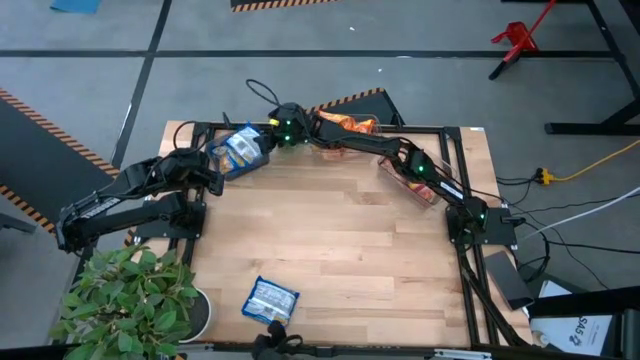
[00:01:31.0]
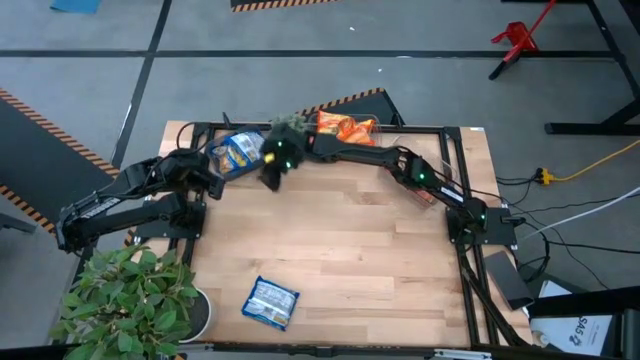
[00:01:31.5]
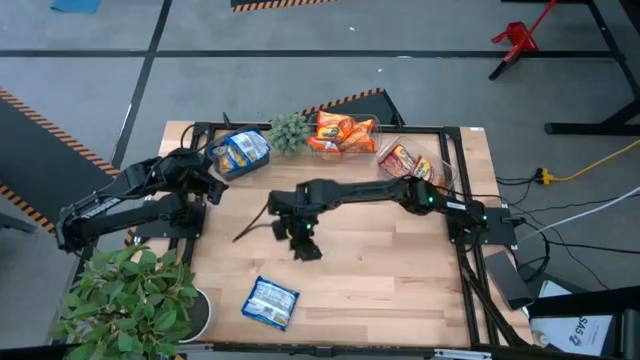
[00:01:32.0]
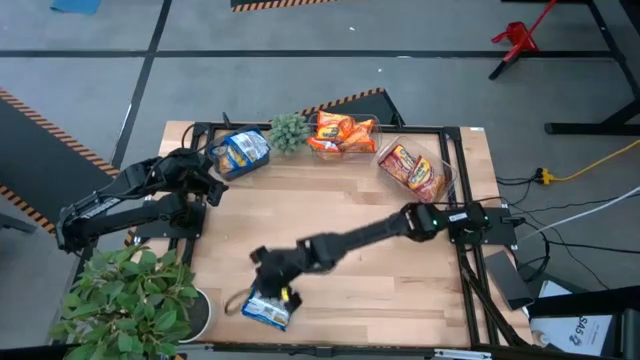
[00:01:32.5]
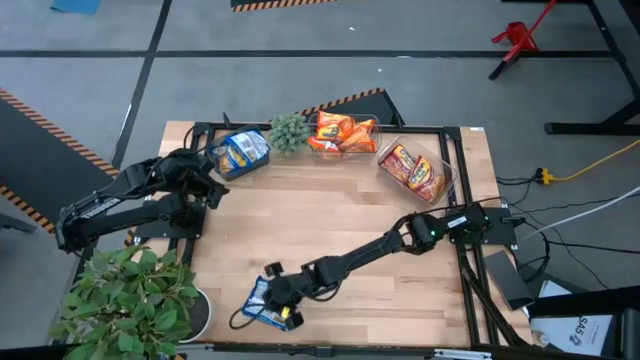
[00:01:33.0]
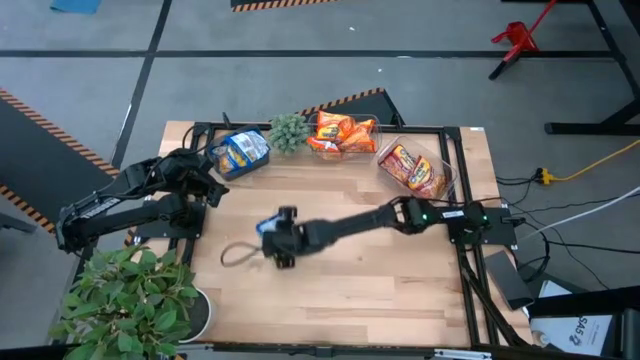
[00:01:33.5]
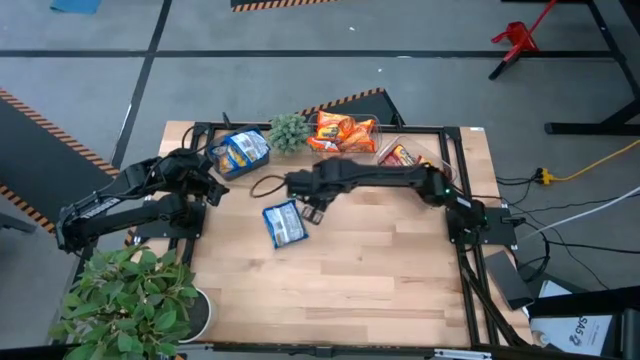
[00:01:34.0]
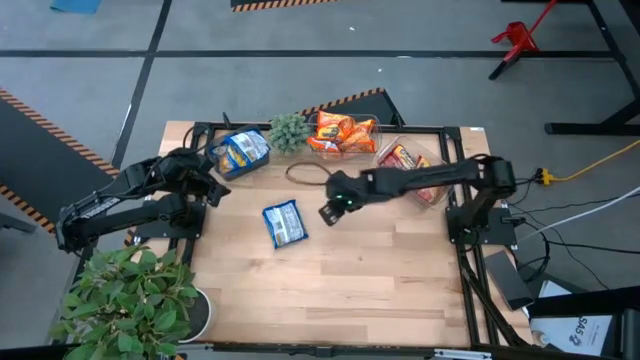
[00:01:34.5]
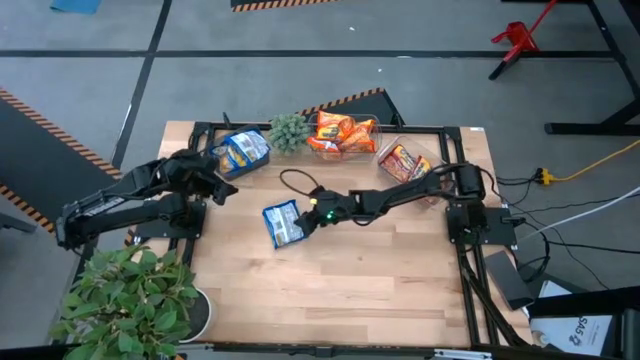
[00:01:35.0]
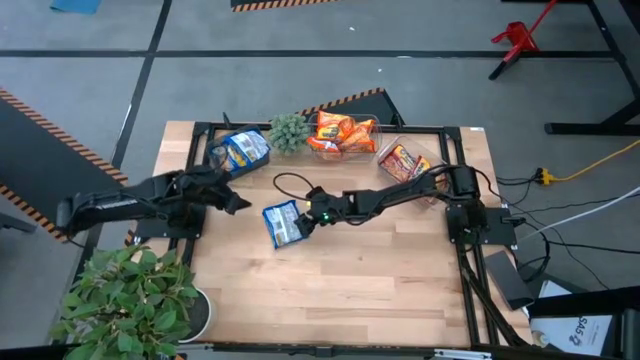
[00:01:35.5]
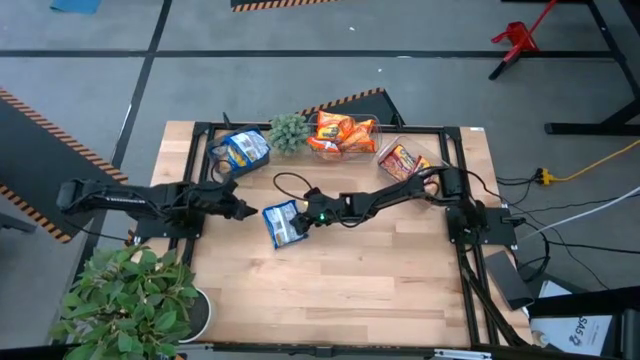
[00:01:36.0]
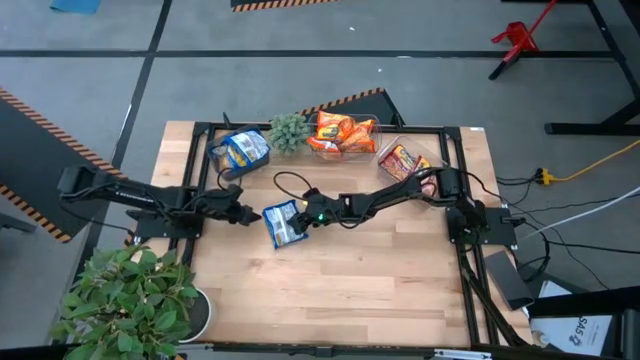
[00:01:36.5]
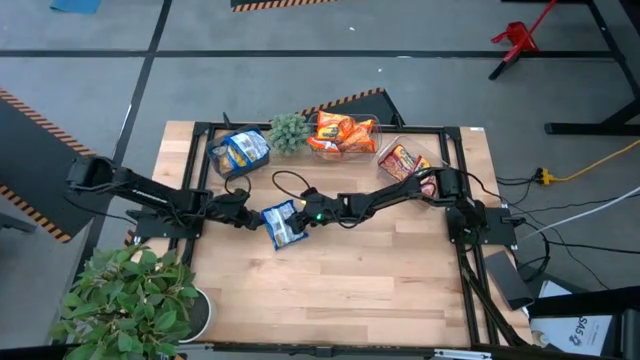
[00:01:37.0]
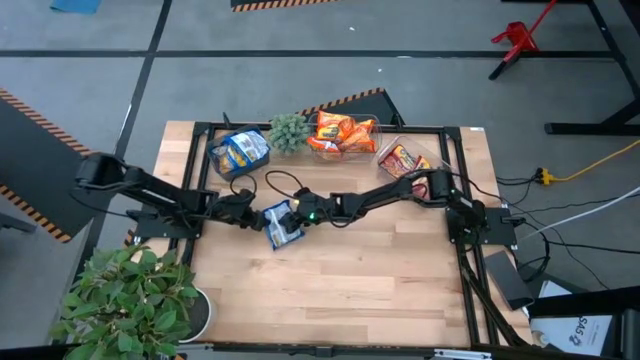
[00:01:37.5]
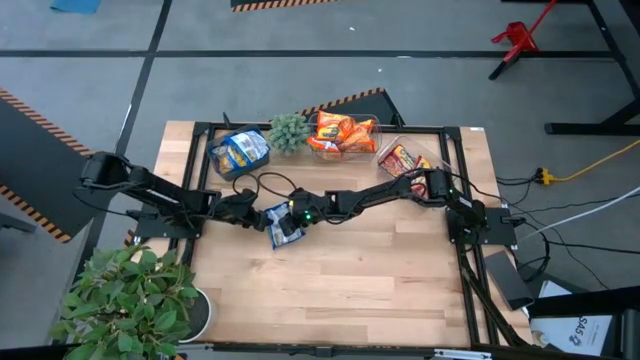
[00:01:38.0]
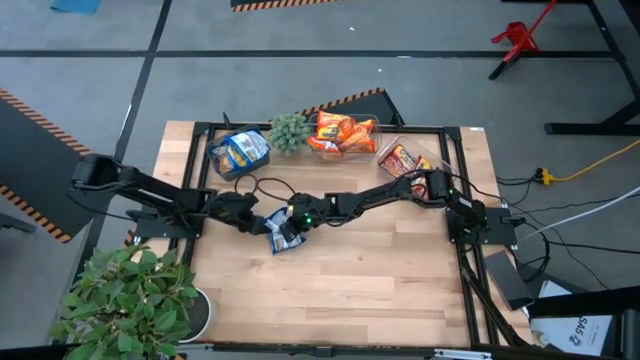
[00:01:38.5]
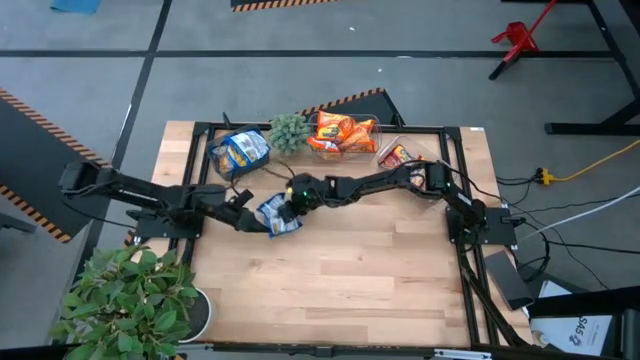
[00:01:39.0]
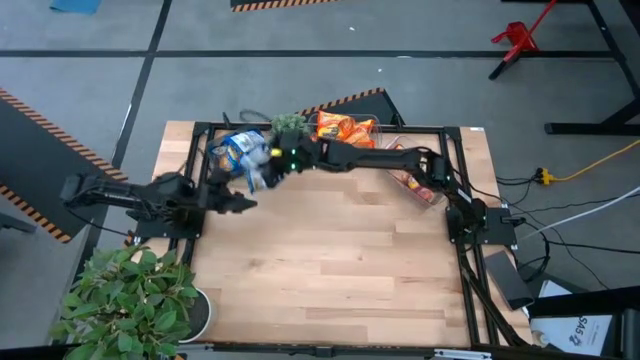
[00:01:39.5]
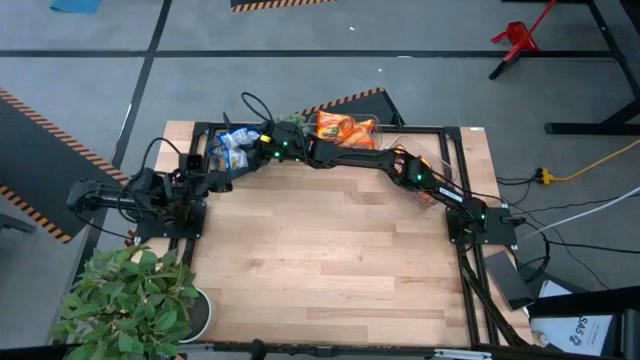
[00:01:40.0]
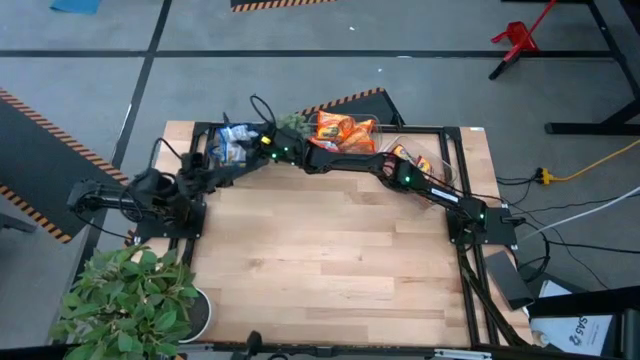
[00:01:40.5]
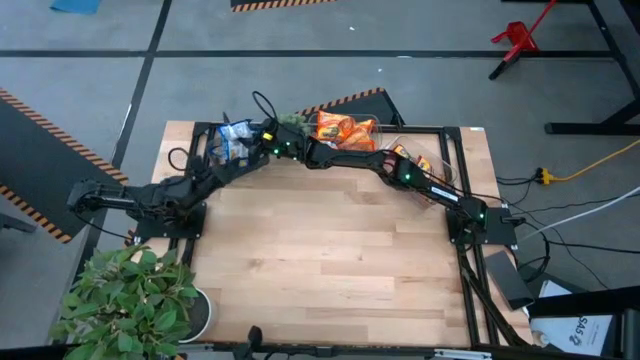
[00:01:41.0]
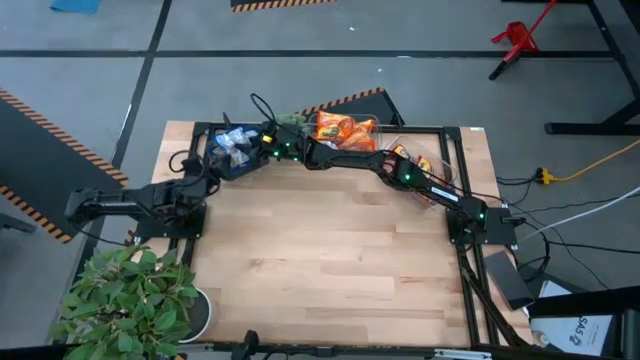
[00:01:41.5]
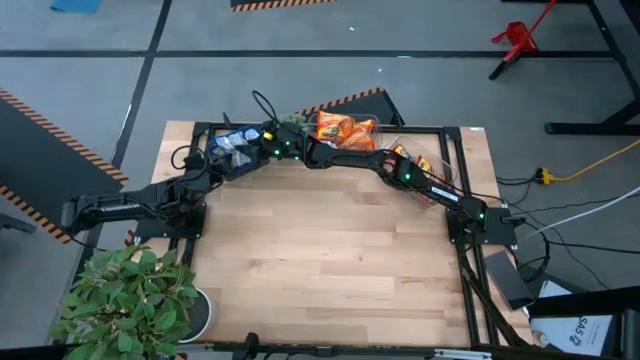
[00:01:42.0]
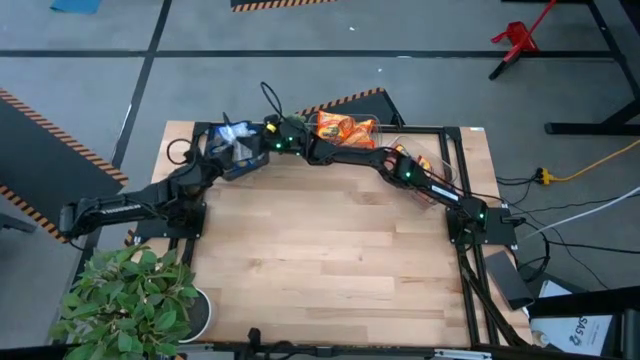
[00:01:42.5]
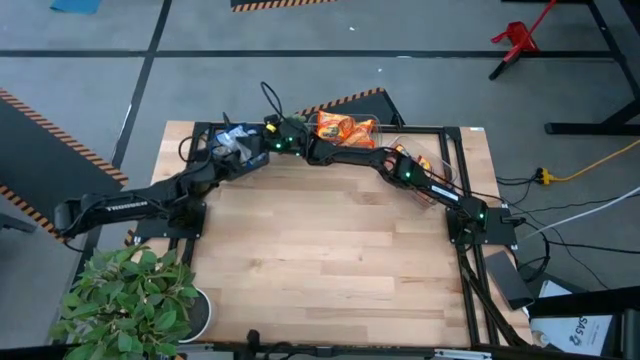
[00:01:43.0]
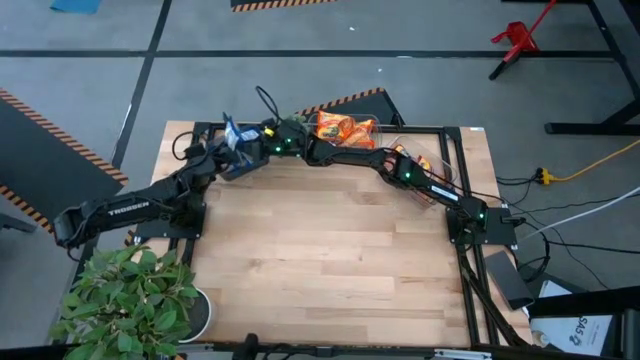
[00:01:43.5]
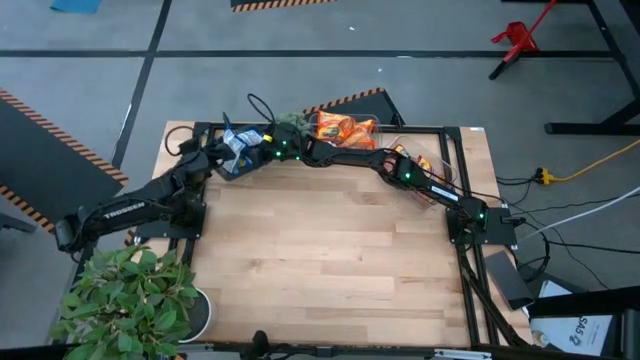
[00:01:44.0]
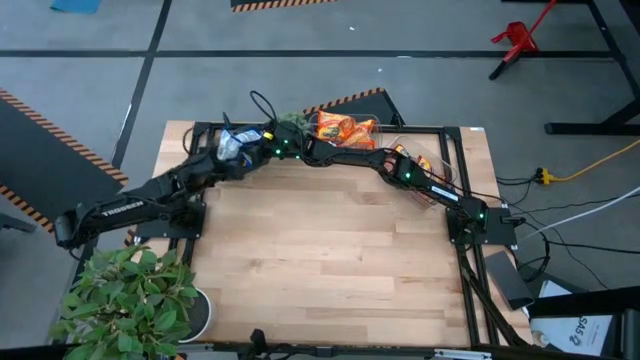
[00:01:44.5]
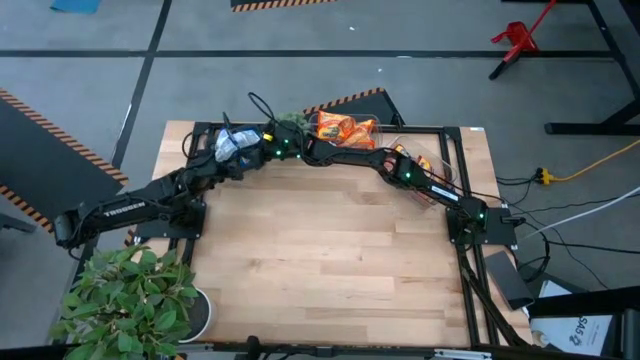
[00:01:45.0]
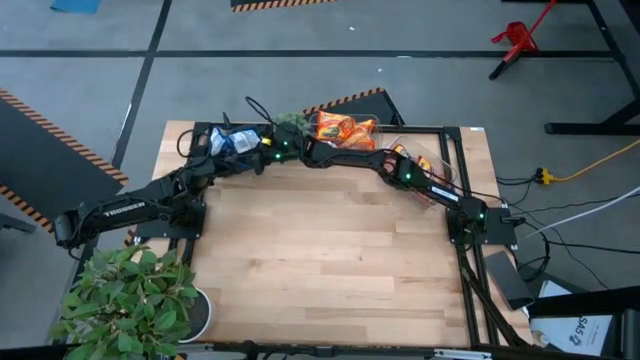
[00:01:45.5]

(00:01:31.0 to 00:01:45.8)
Task: Sort Maruchan noodles
Put the blue noodle pack into the black bin

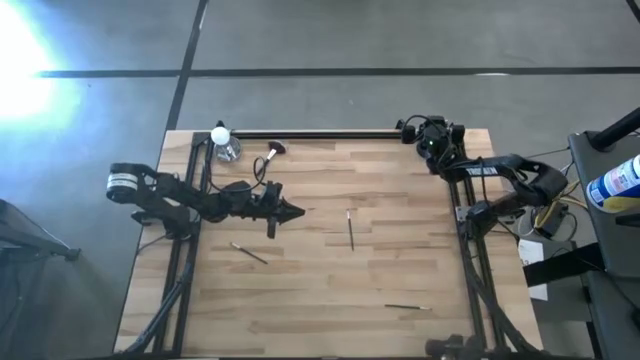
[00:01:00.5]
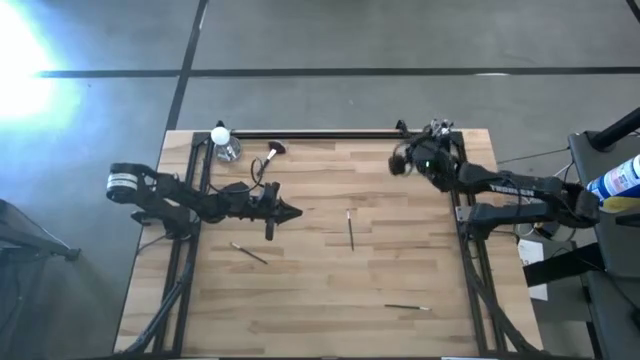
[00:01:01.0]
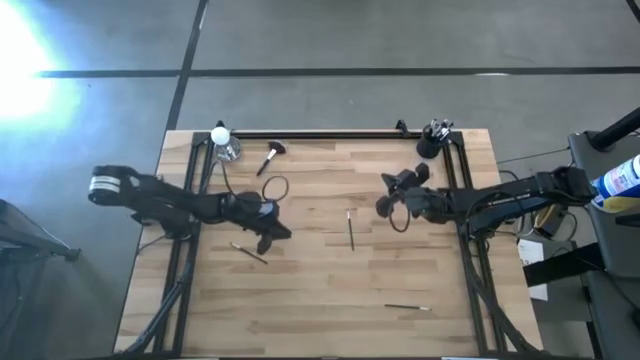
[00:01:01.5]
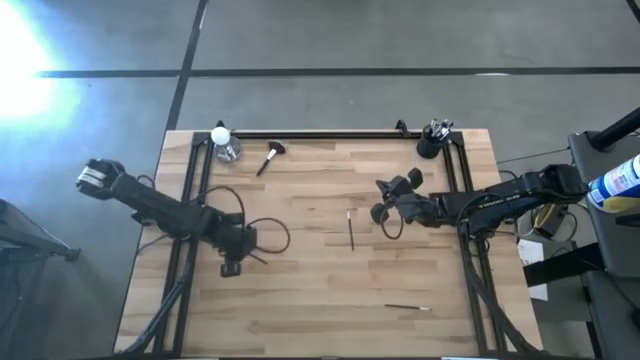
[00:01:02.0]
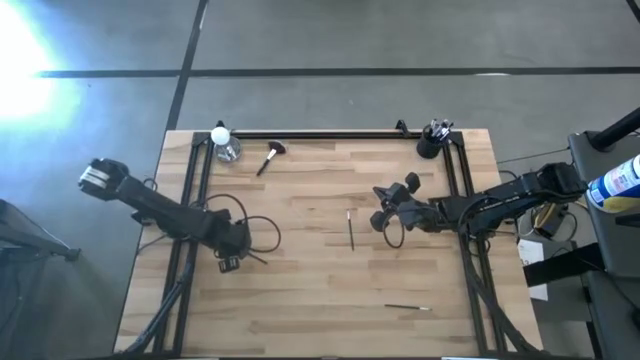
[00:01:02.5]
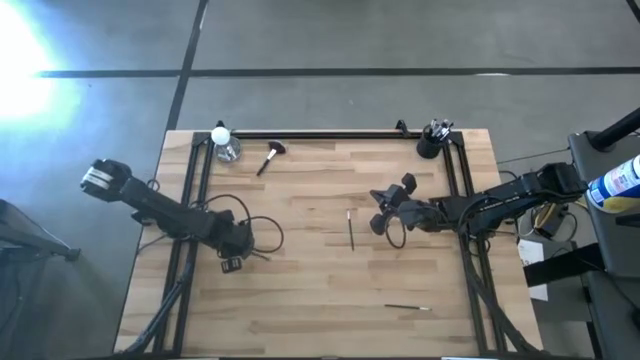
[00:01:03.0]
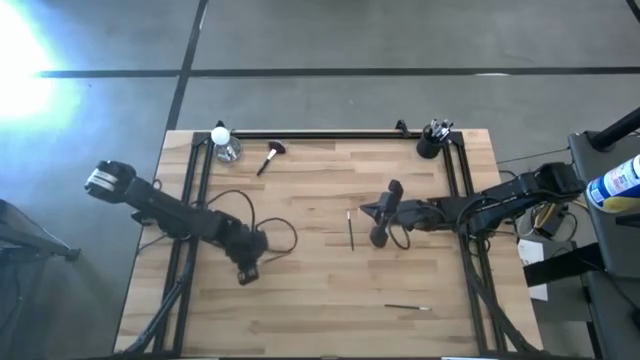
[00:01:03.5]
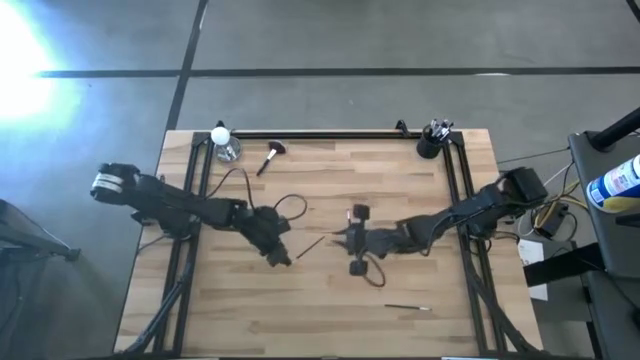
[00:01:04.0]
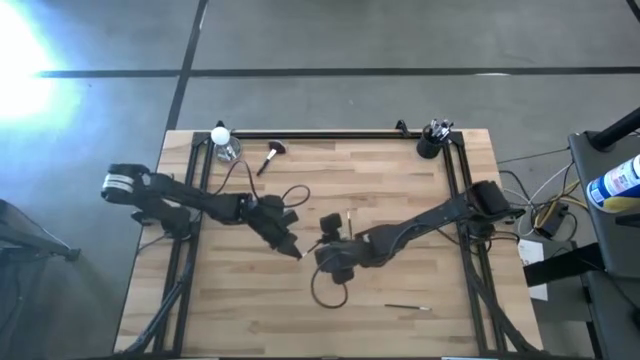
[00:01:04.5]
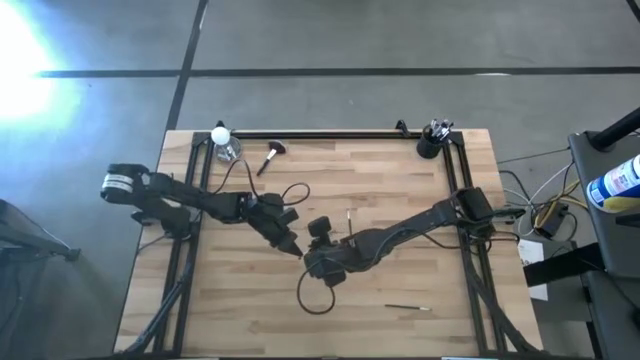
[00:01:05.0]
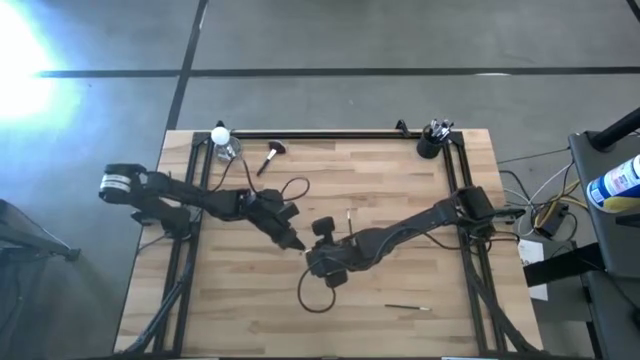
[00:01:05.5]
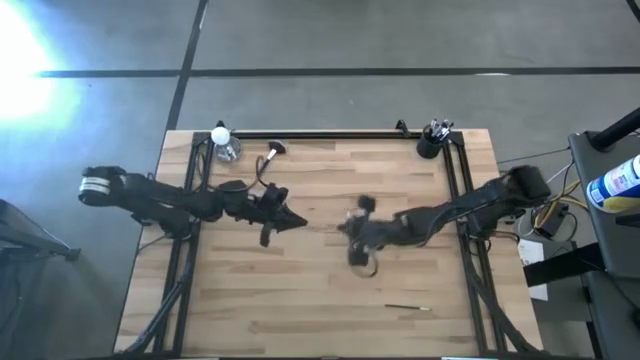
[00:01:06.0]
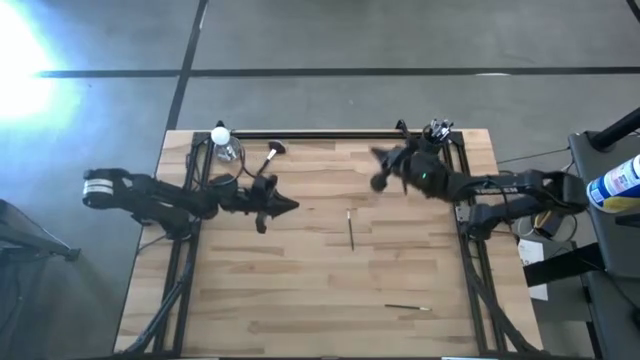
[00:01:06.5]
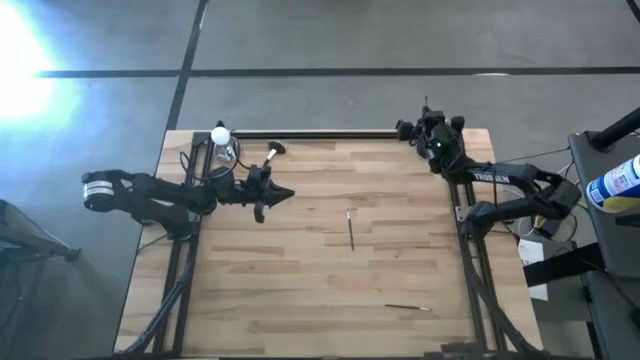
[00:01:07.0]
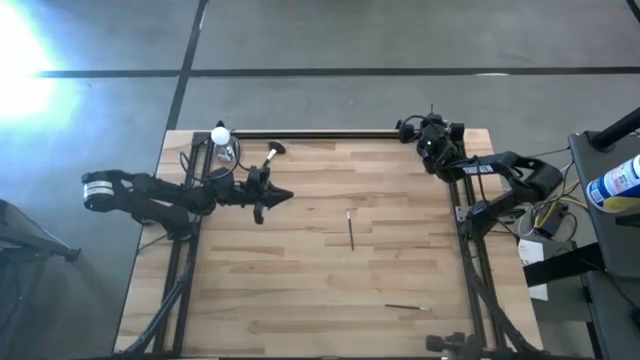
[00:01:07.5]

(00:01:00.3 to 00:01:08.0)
Task: Put items in baskets/containers
Put the foundation brush into the mesh organizer
